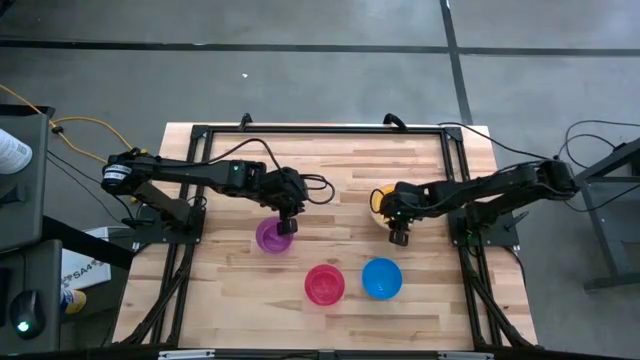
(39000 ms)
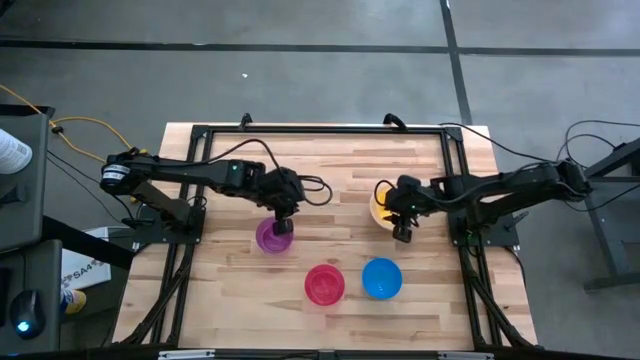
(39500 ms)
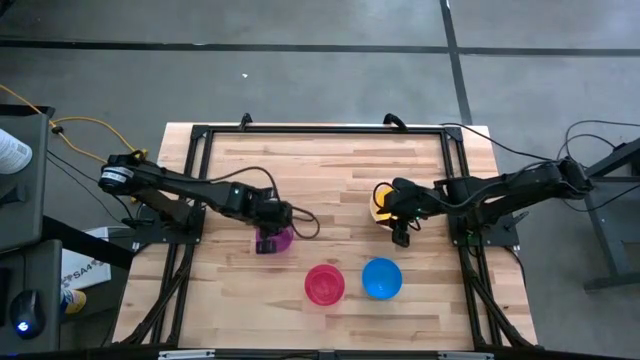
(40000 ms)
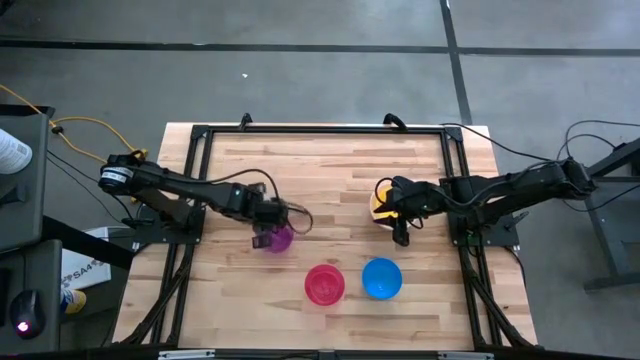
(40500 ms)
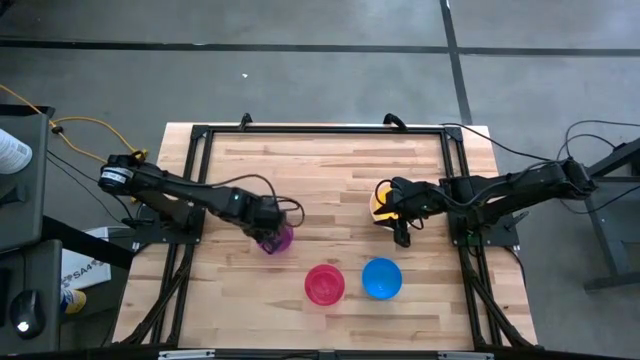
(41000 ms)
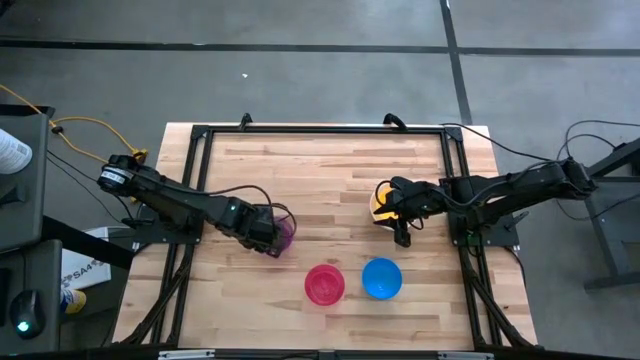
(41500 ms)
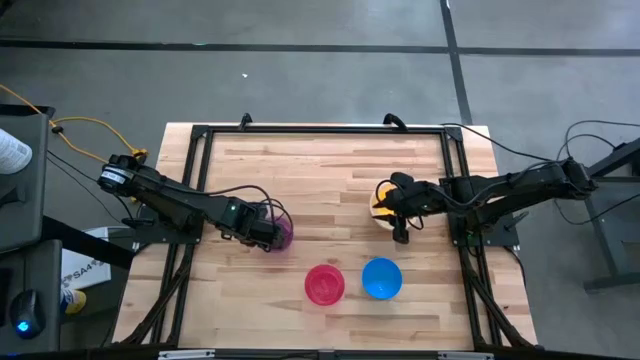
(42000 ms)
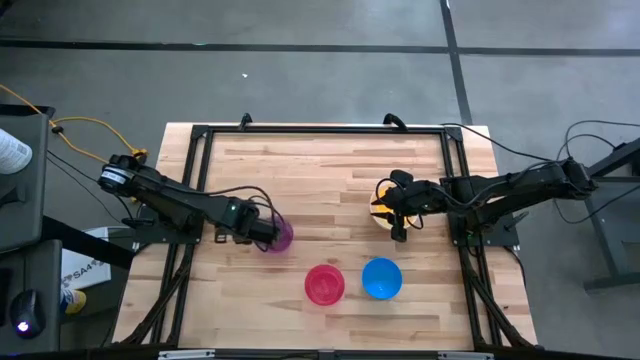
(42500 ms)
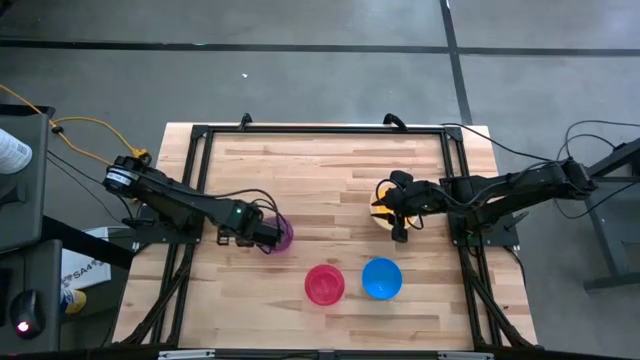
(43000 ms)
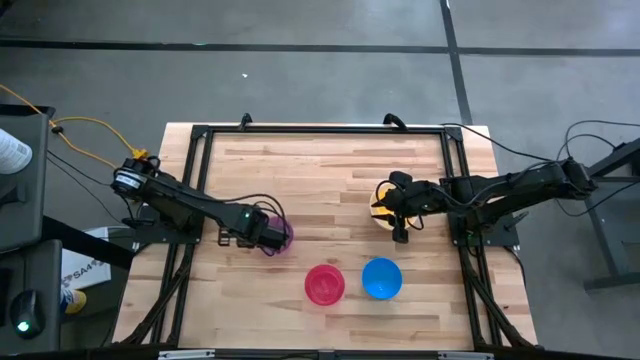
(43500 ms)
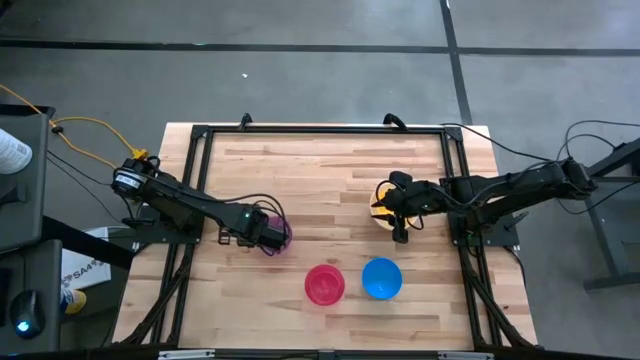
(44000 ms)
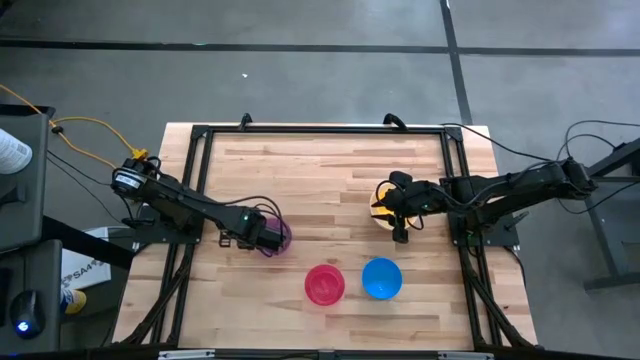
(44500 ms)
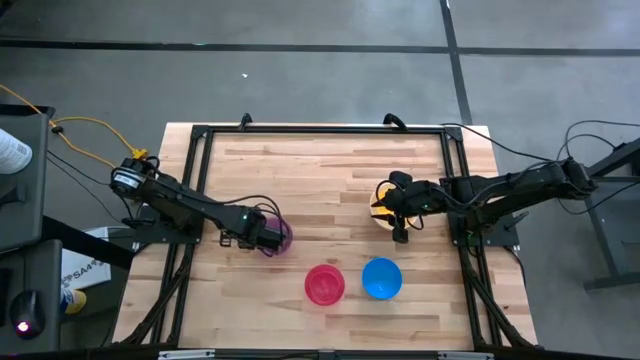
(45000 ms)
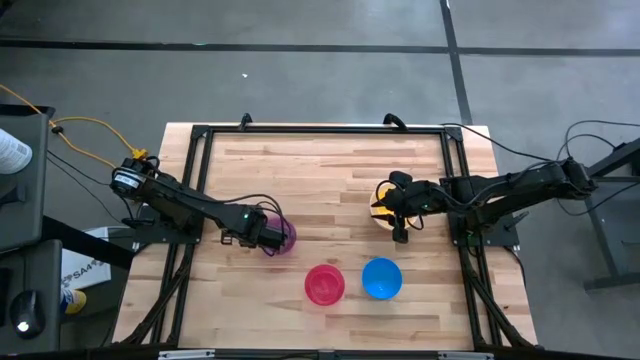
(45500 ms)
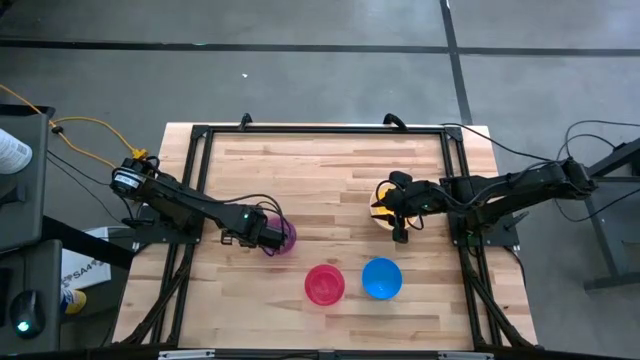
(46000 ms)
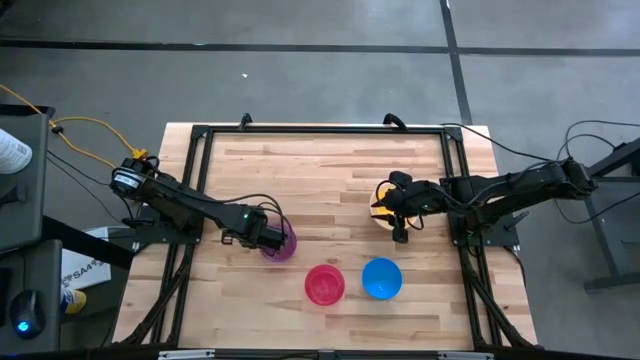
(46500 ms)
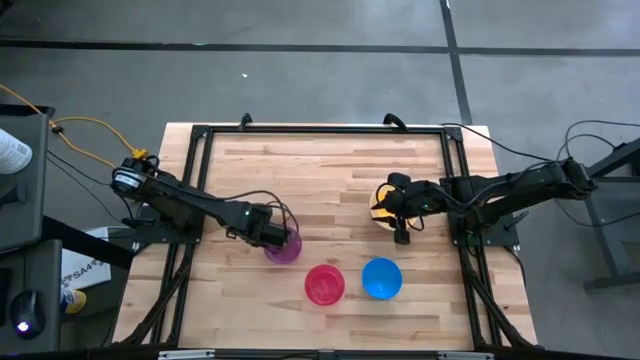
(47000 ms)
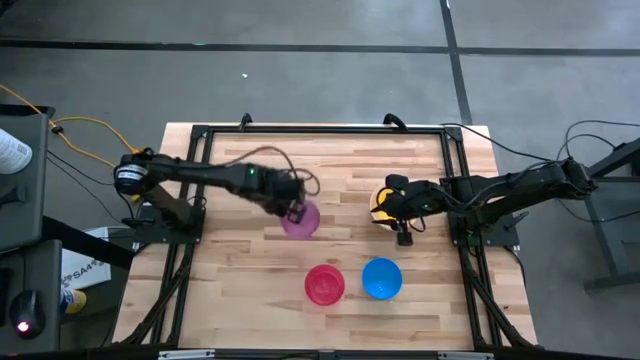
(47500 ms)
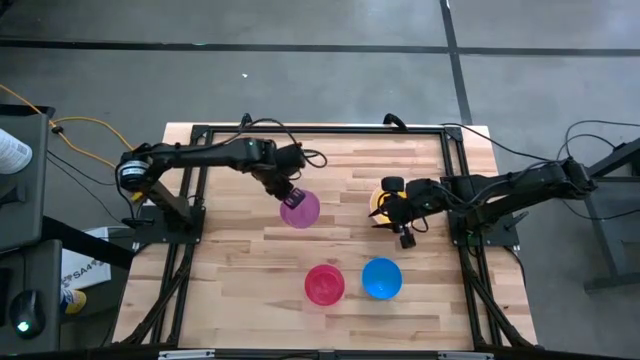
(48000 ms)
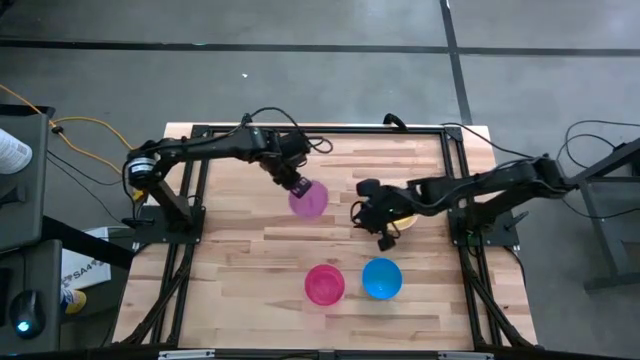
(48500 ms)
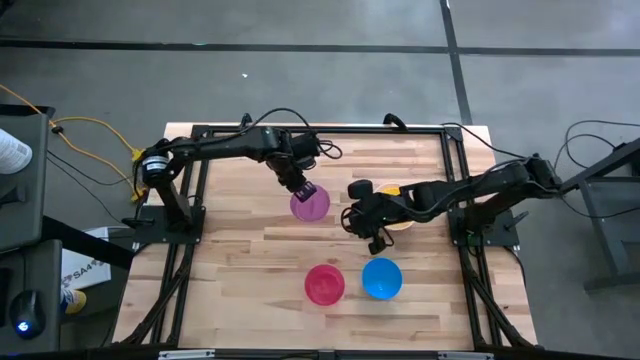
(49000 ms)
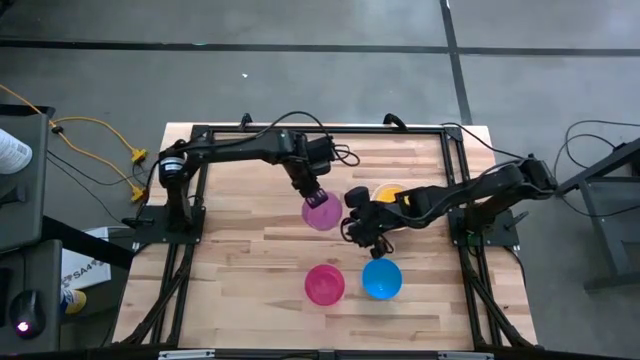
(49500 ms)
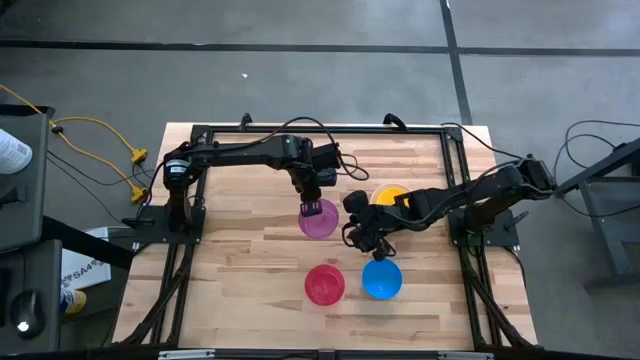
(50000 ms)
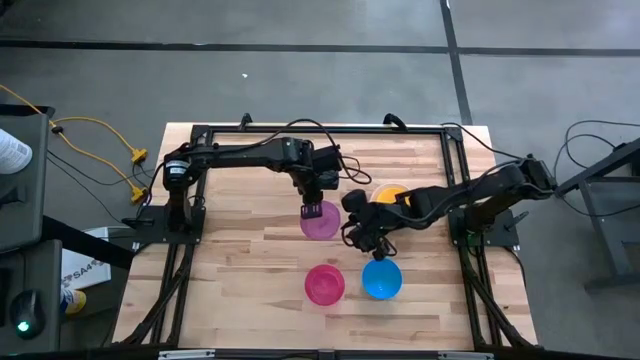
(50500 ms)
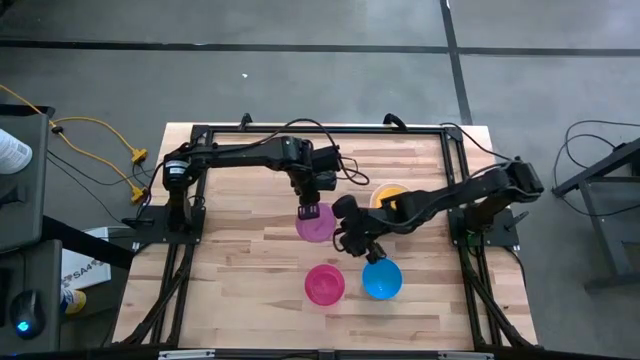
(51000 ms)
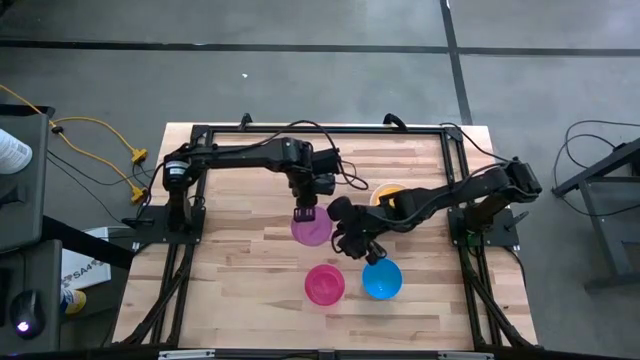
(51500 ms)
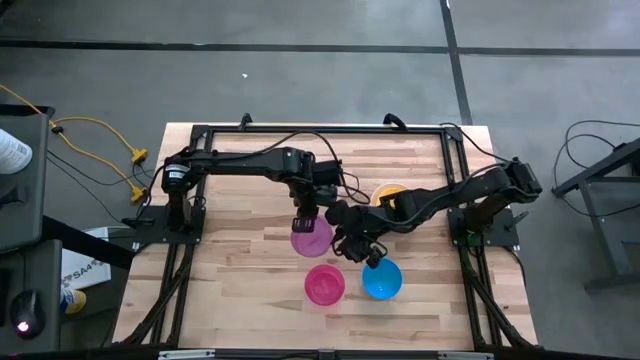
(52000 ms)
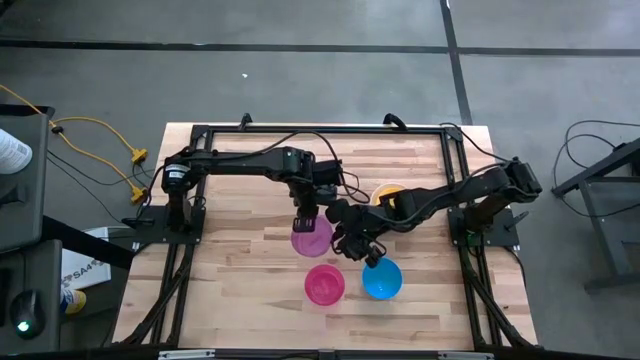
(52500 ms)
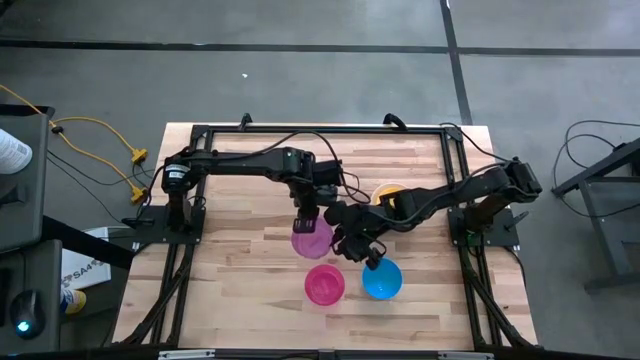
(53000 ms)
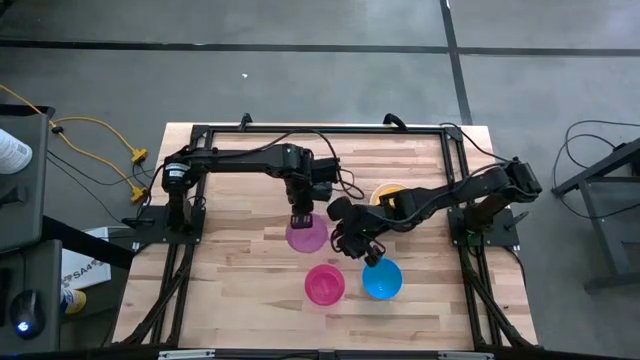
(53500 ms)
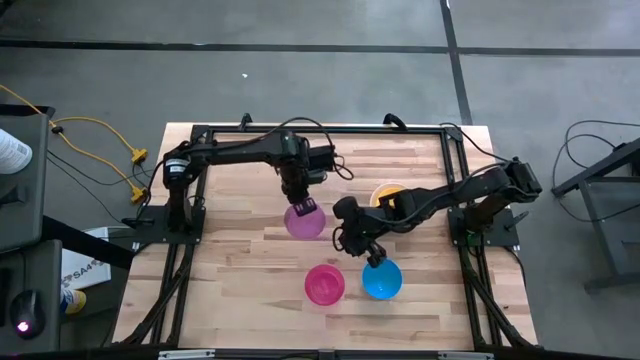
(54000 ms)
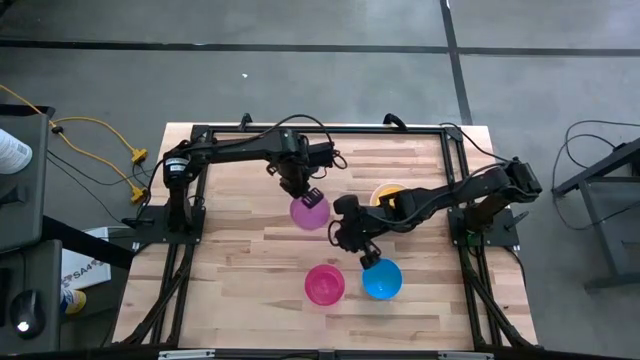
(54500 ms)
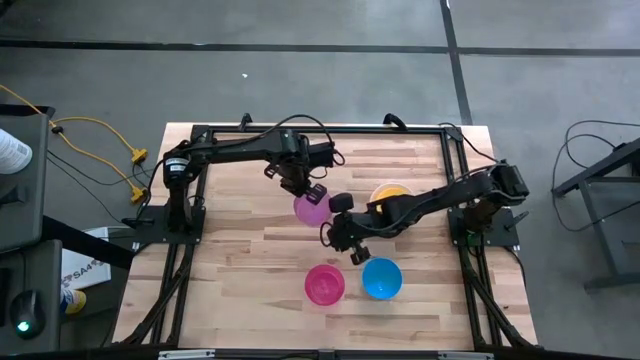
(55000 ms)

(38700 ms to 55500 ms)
Stack the violet bowl on top of the yellow bowl

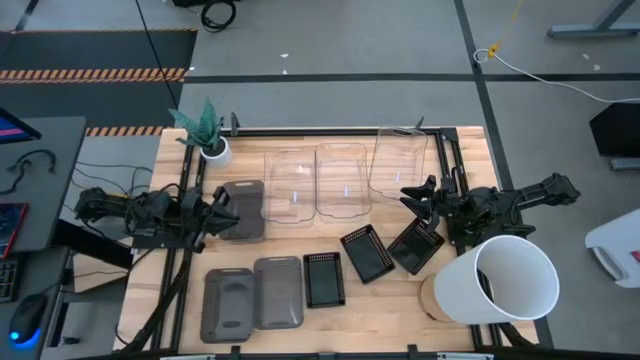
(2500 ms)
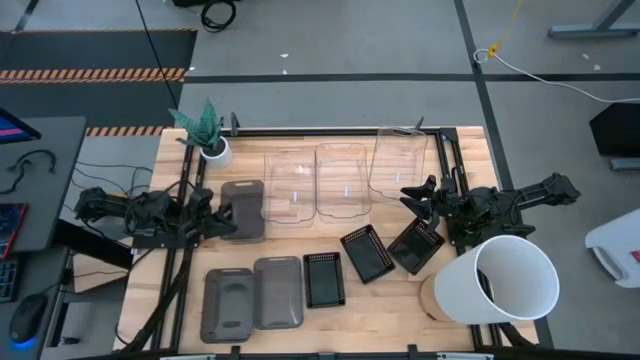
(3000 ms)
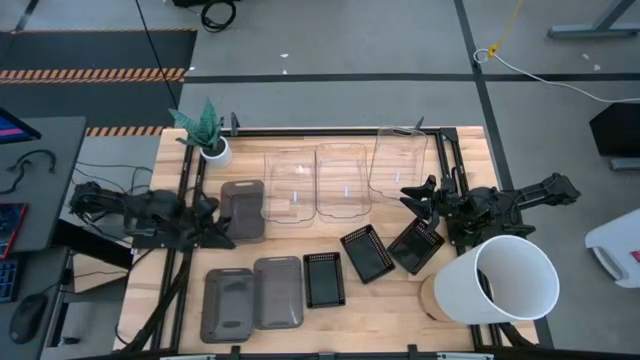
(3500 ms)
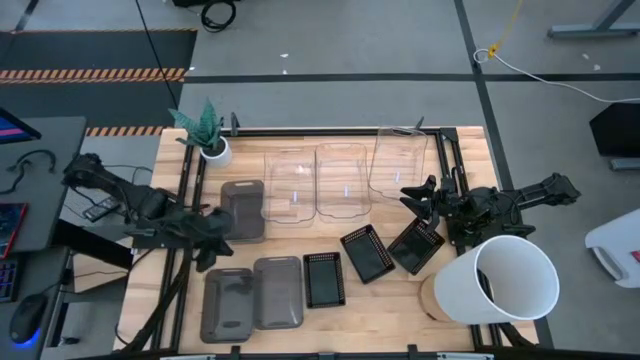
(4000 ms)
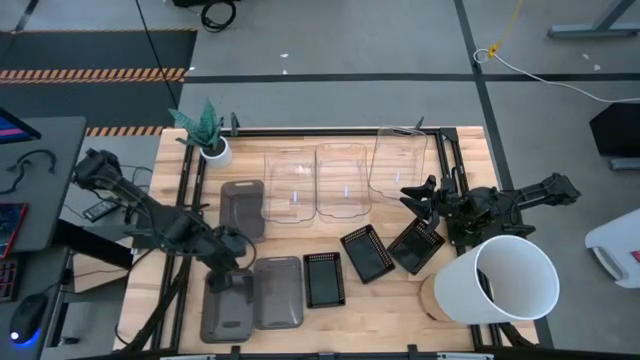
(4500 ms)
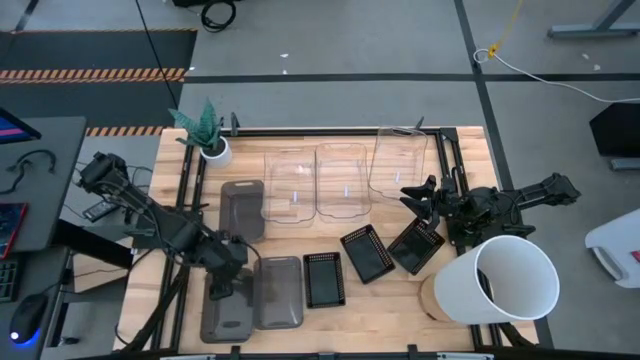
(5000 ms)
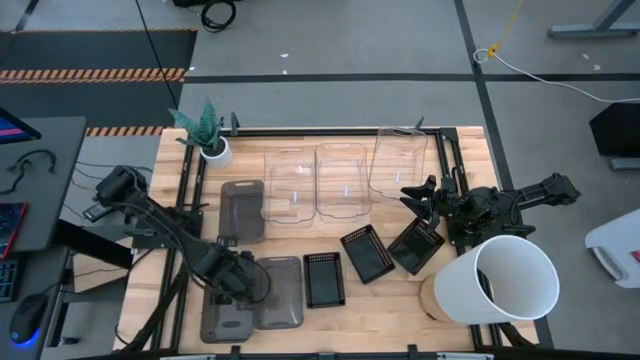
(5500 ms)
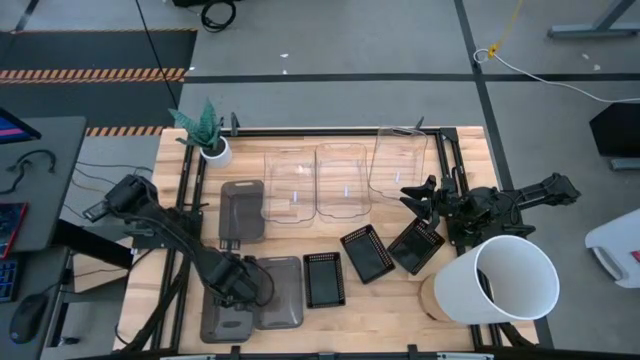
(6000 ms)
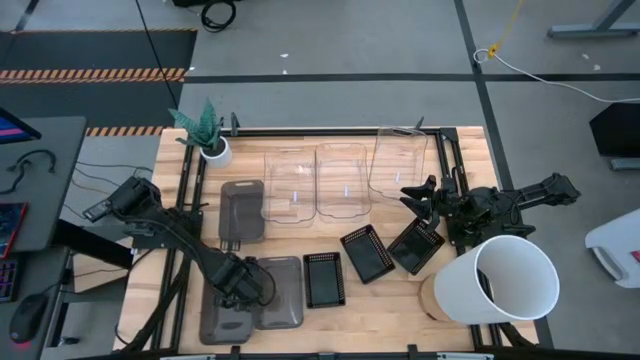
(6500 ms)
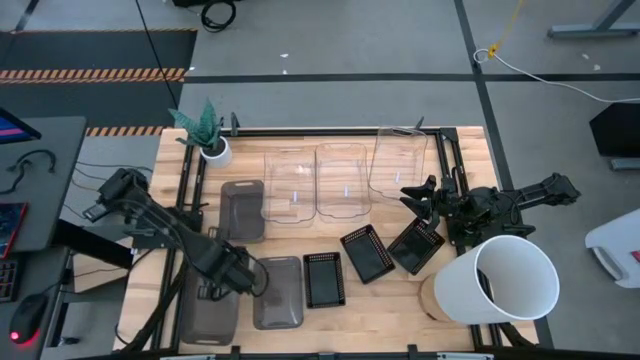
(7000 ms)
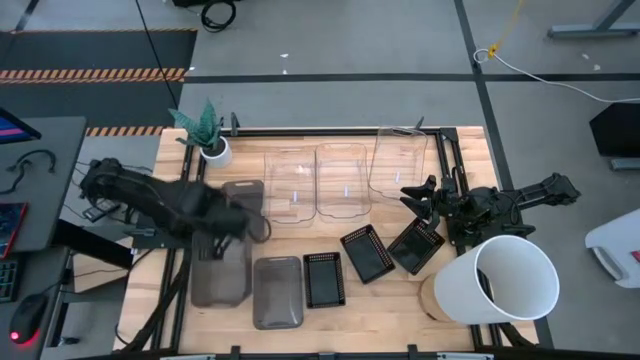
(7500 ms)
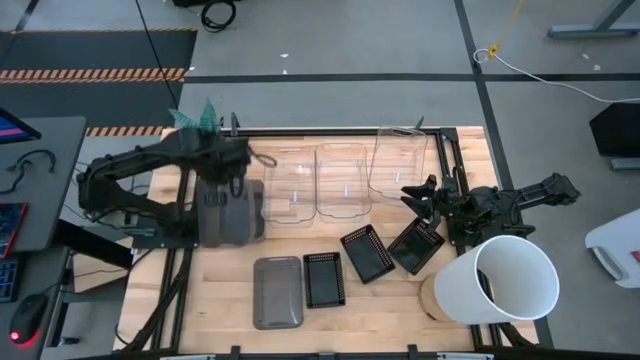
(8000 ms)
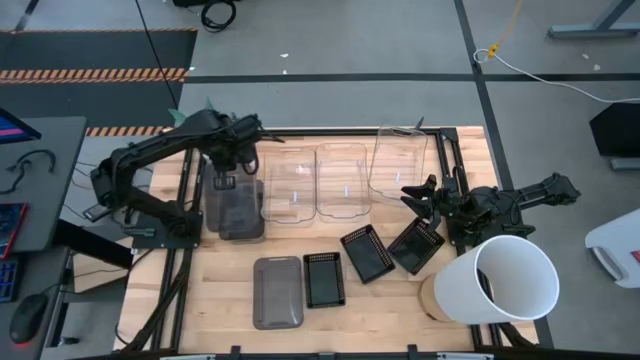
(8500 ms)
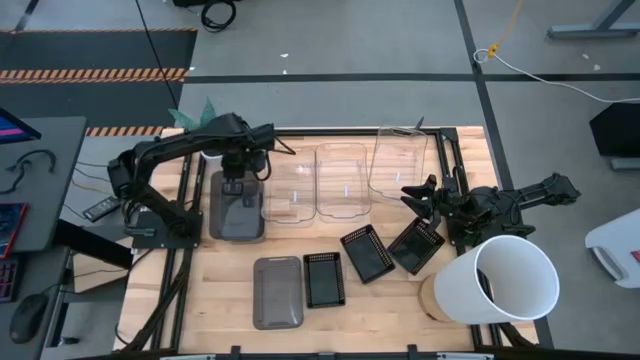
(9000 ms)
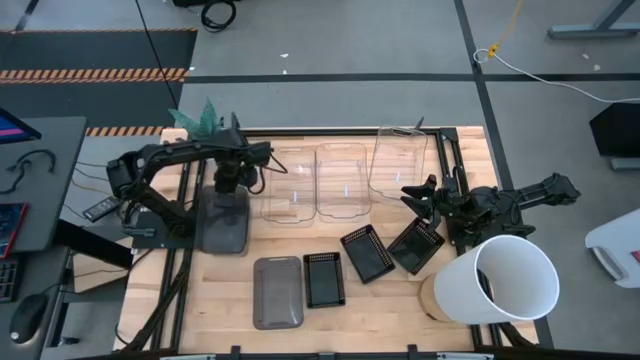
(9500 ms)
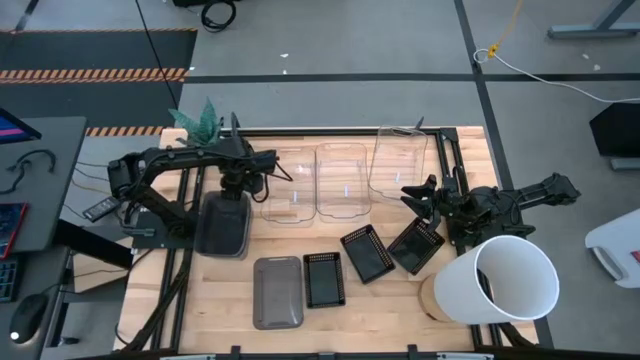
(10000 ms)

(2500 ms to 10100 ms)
Stack the left gray bin on the top gray bin
